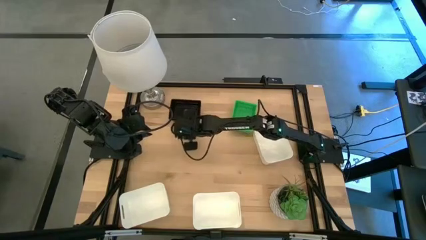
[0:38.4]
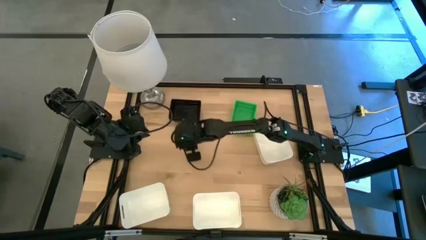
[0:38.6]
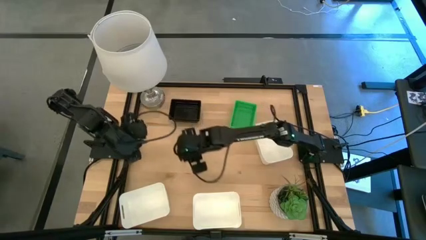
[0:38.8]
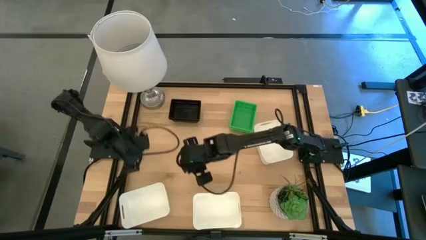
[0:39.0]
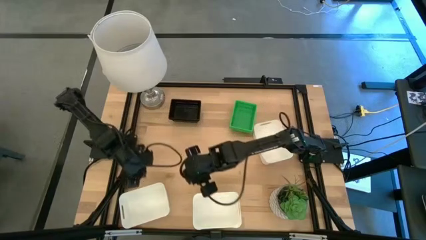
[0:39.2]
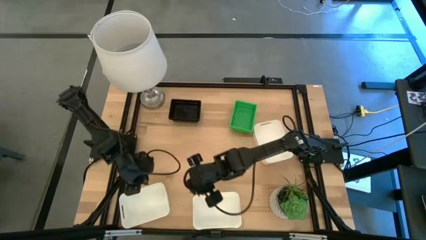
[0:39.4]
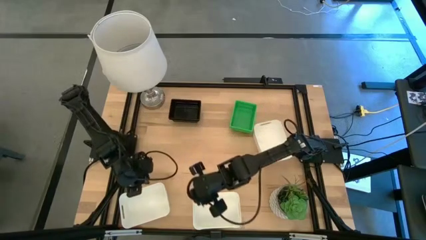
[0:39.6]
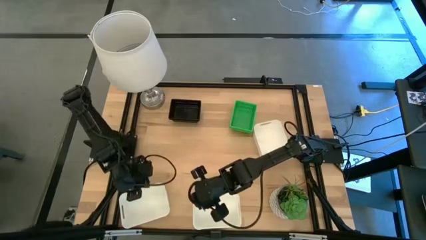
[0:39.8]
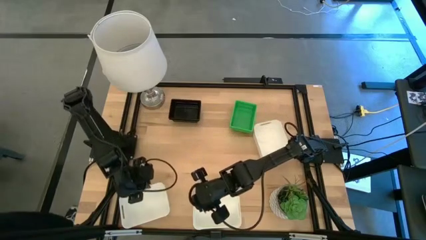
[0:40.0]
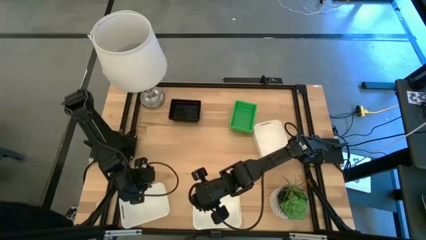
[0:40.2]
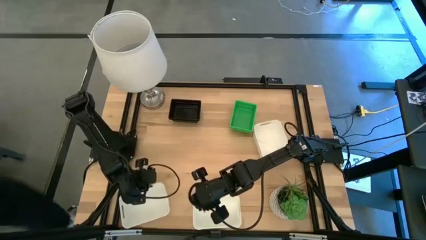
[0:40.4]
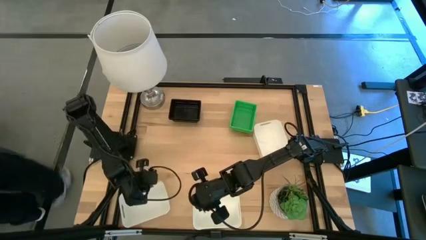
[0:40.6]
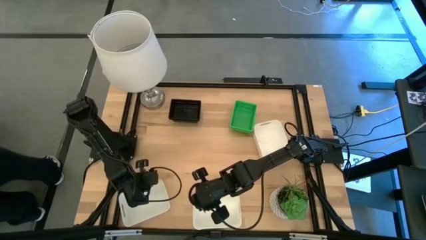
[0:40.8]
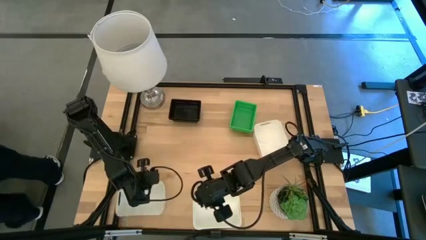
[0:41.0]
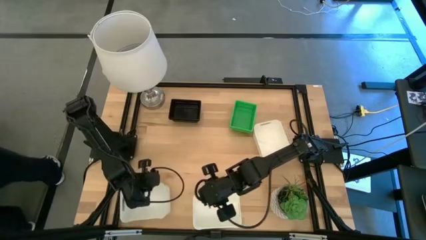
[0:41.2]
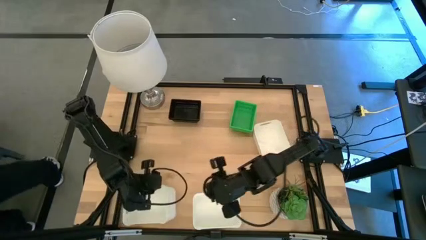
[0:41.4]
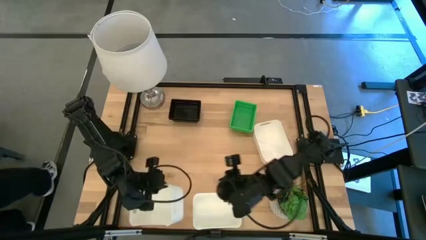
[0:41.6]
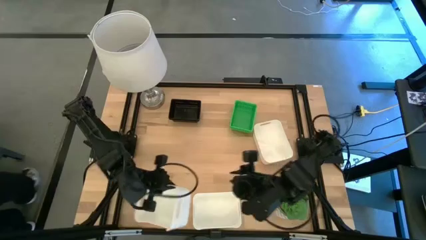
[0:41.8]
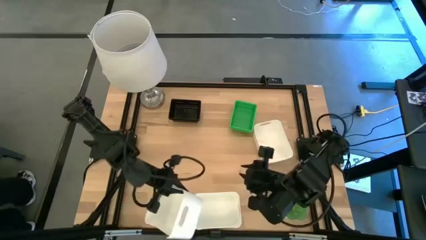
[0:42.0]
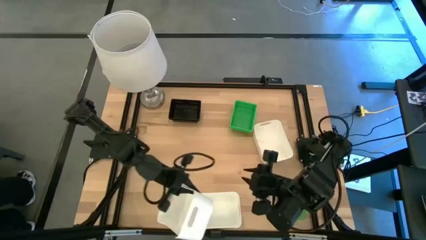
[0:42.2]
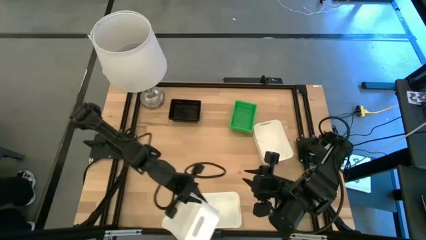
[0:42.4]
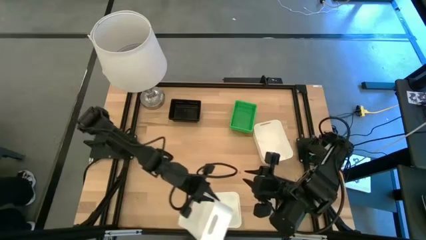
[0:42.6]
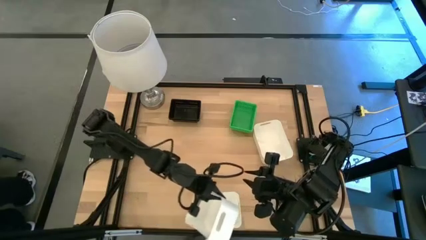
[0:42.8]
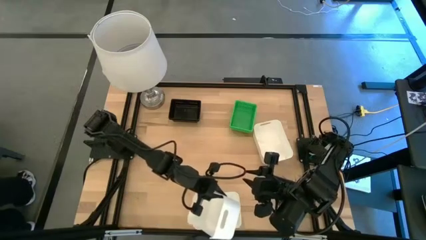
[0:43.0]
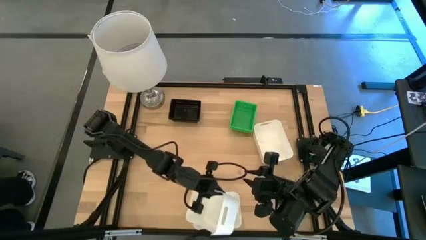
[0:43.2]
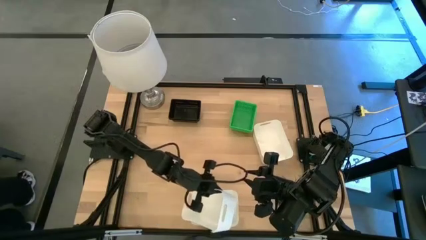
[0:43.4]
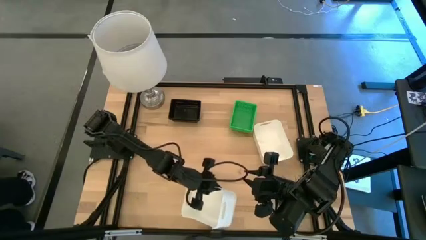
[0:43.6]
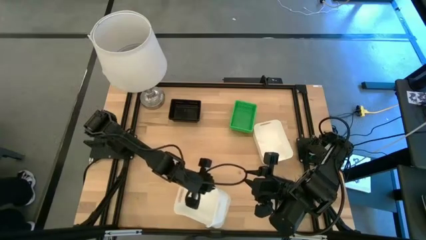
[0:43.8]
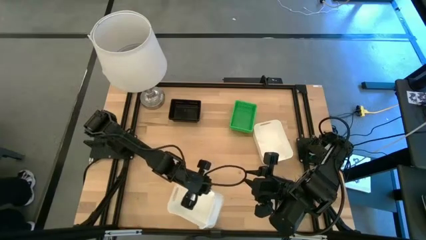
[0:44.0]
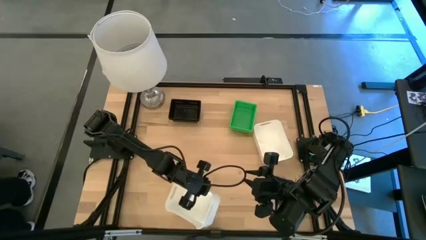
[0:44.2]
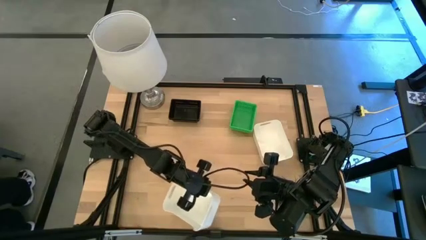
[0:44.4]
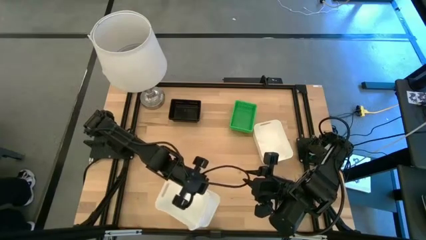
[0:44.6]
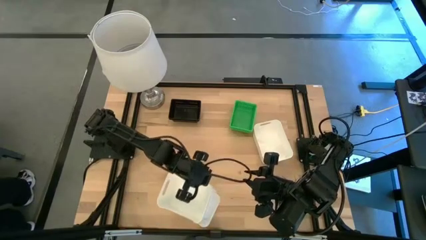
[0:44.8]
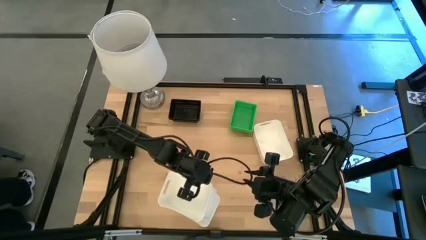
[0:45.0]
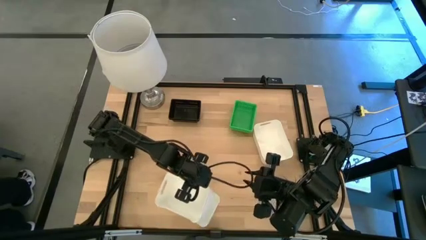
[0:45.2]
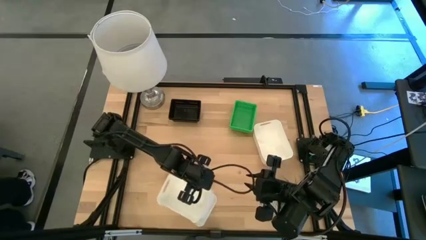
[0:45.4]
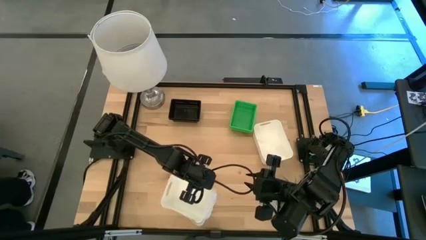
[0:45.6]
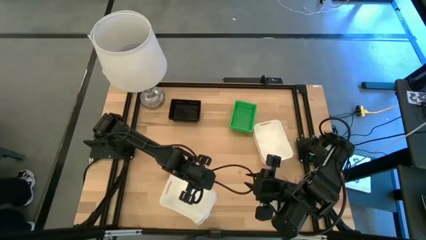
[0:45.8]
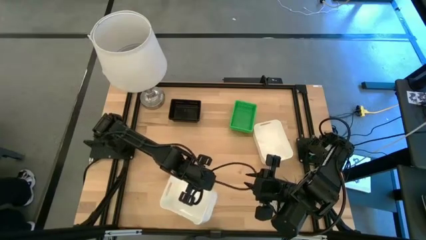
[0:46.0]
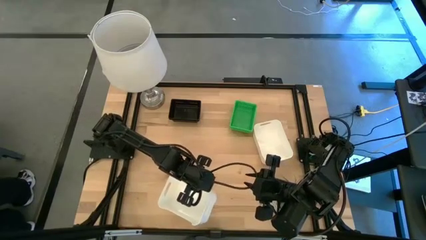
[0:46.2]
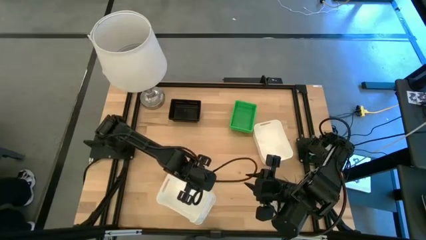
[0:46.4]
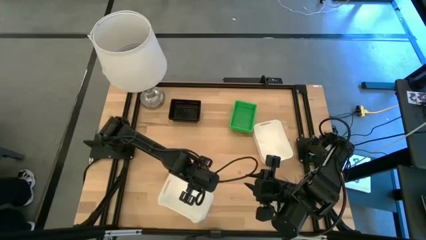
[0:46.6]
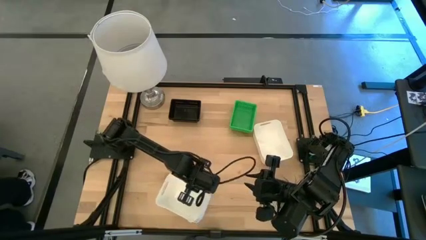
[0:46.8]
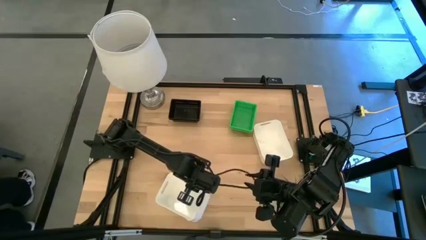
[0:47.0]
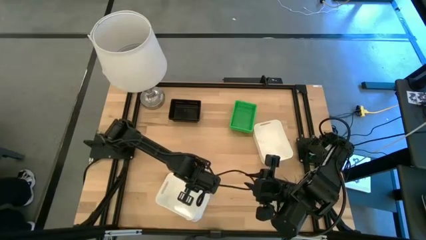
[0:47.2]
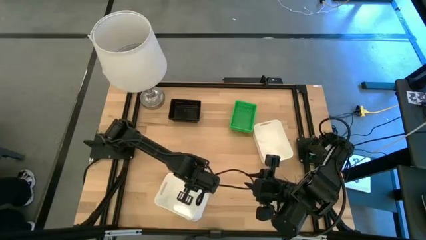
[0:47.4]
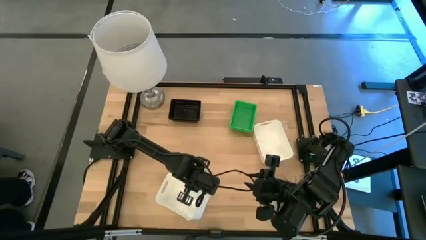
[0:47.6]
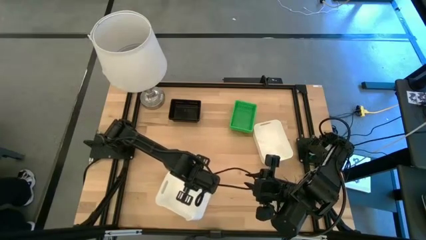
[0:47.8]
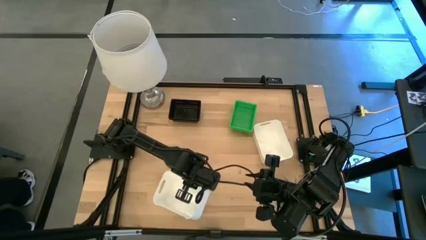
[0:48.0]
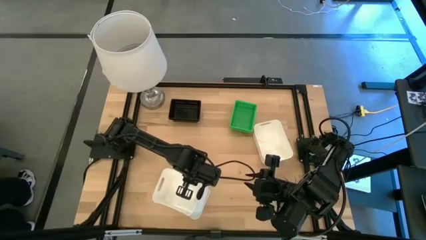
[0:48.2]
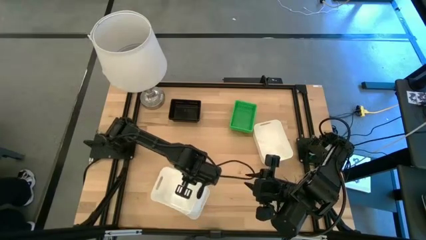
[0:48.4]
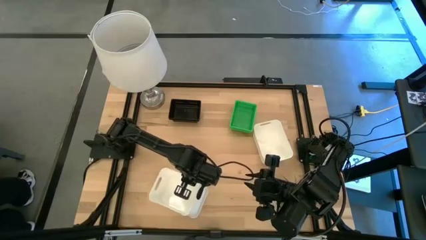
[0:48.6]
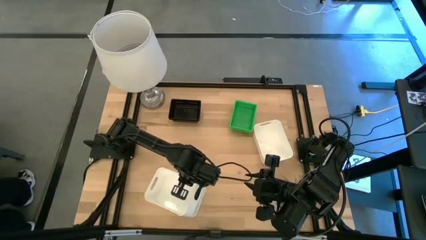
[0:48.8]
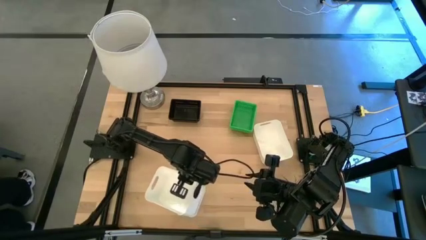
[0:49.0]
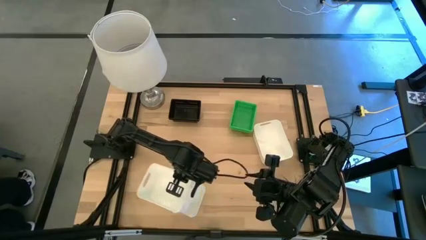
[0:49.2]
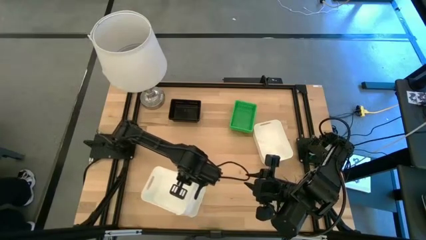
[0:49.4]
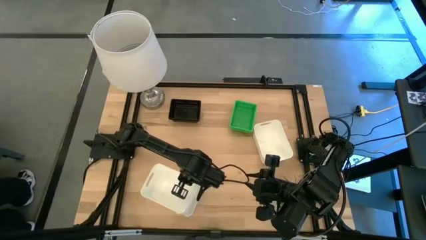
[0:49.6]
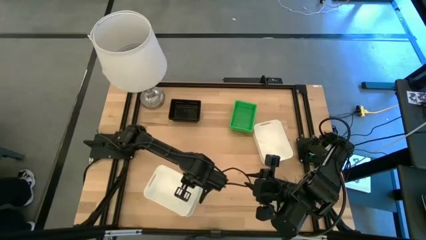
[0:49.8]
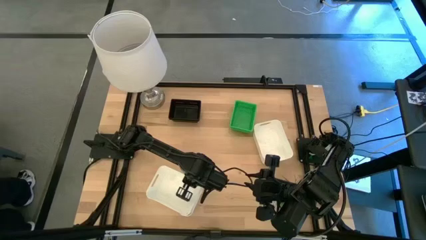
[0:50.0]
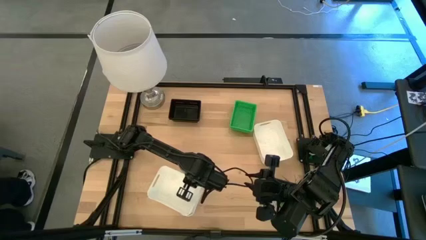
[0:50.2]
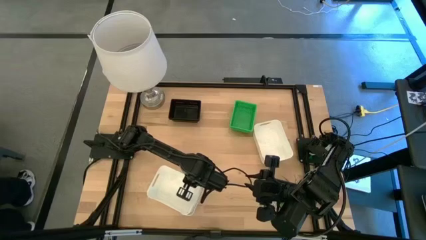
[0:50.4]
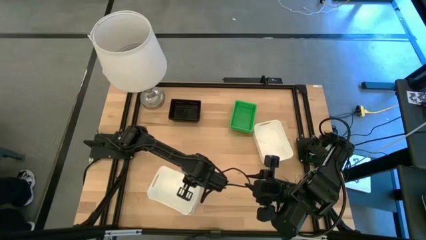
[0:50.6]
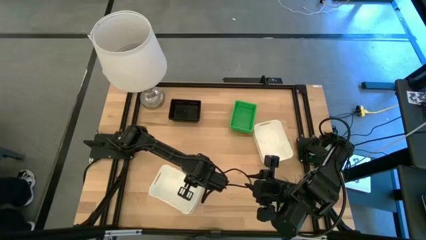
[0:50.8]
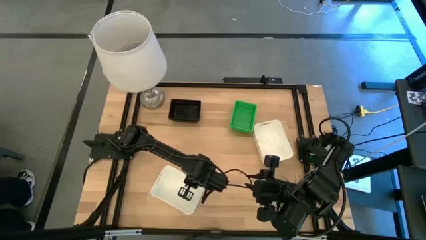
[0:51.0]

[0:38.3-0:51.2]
Stack the left white bin on top of the middle white bin
